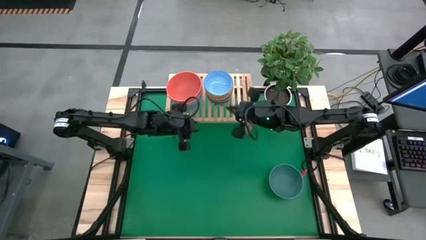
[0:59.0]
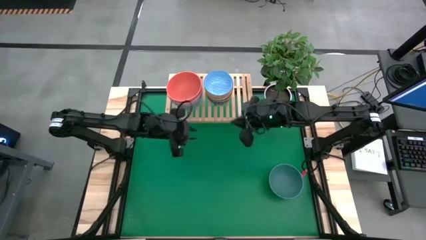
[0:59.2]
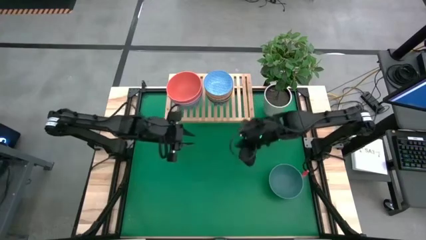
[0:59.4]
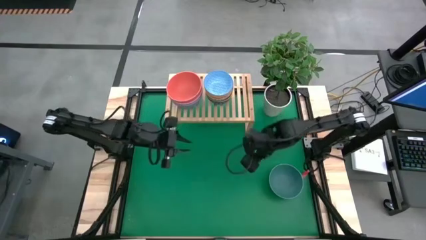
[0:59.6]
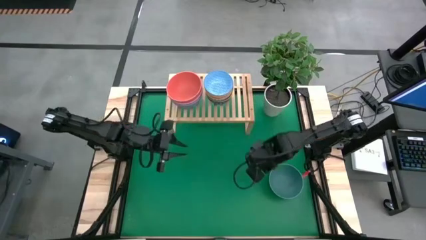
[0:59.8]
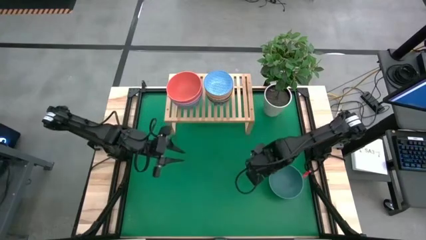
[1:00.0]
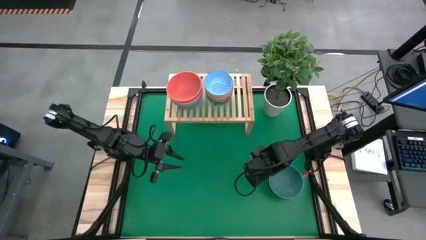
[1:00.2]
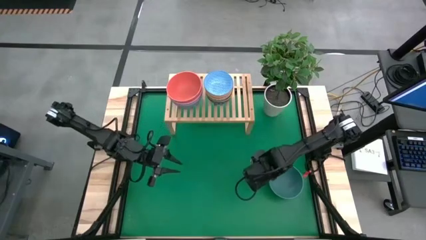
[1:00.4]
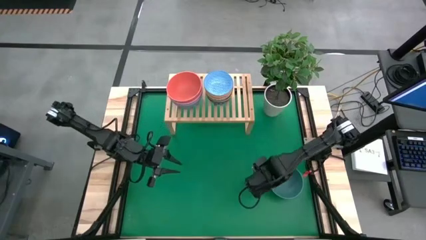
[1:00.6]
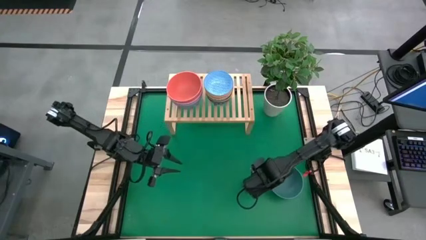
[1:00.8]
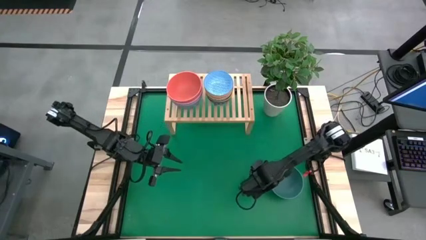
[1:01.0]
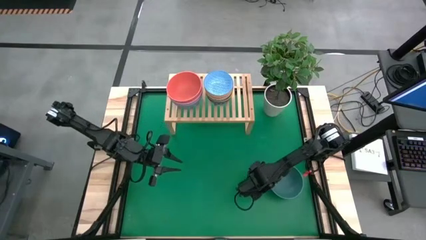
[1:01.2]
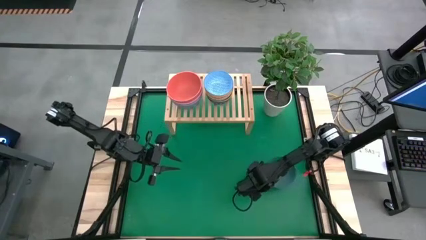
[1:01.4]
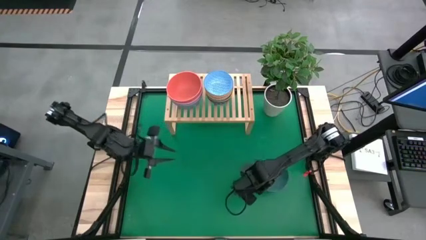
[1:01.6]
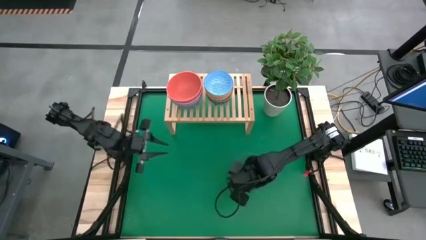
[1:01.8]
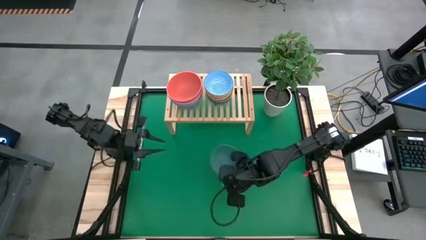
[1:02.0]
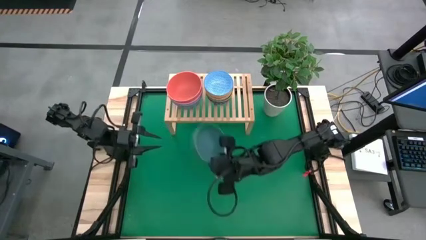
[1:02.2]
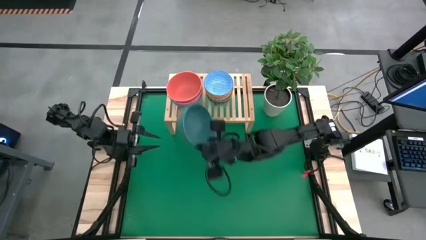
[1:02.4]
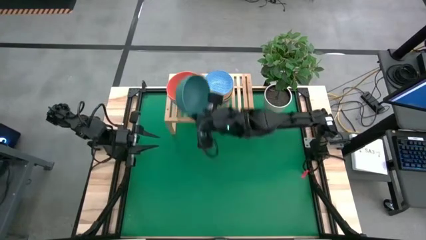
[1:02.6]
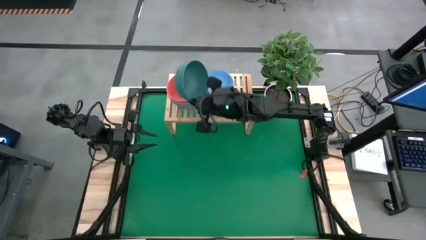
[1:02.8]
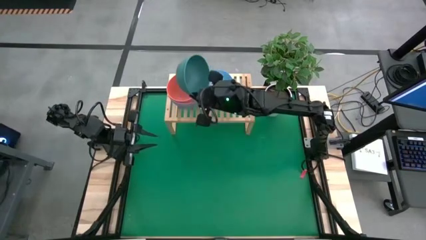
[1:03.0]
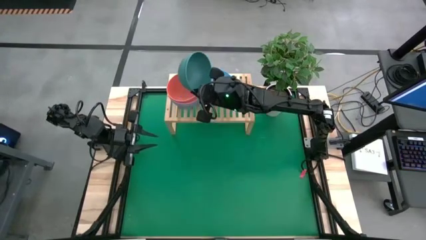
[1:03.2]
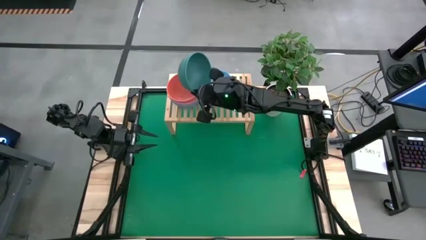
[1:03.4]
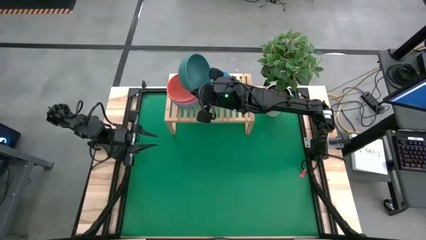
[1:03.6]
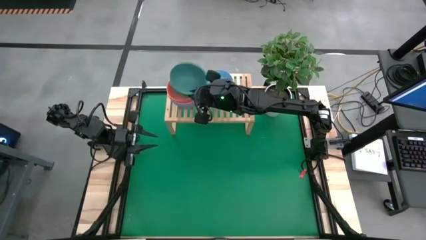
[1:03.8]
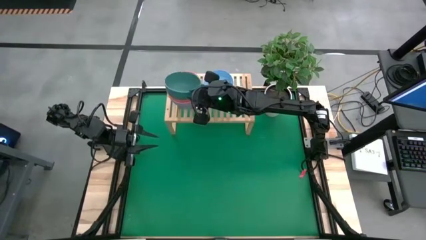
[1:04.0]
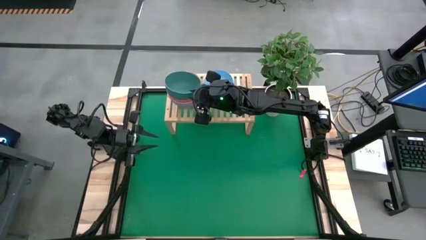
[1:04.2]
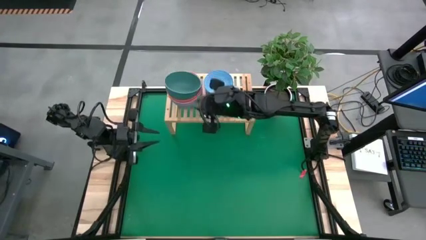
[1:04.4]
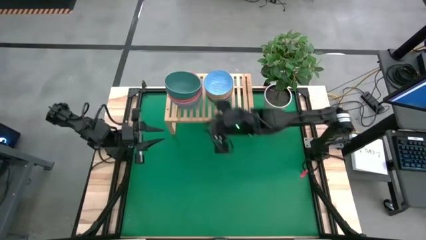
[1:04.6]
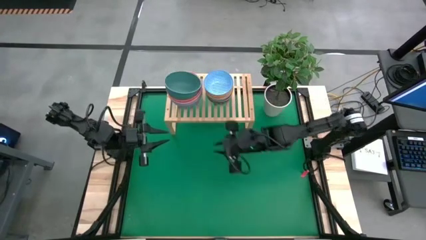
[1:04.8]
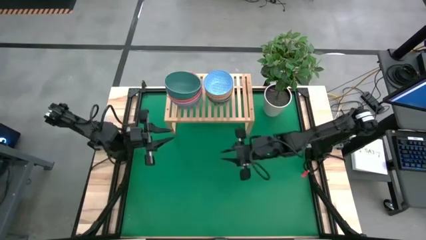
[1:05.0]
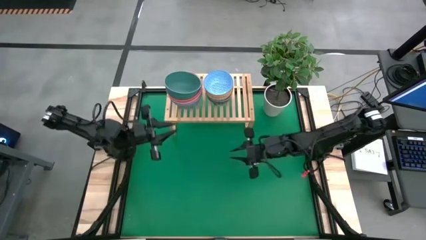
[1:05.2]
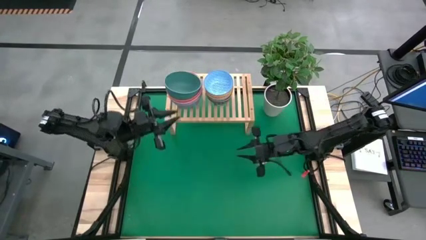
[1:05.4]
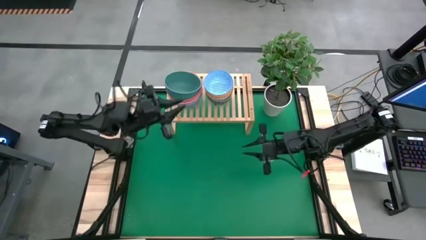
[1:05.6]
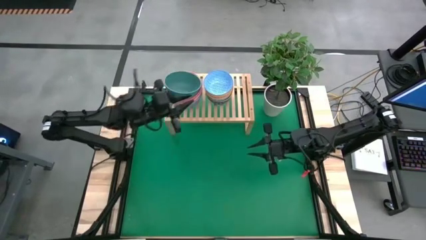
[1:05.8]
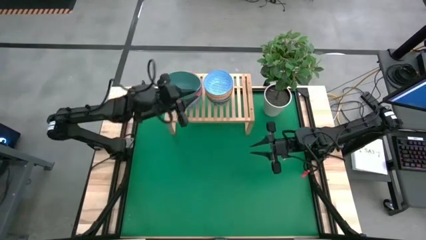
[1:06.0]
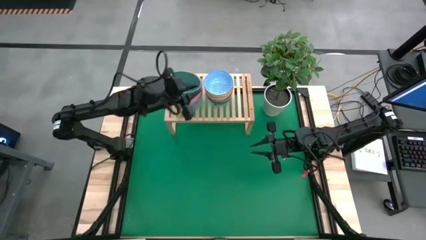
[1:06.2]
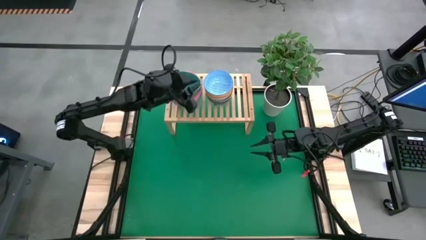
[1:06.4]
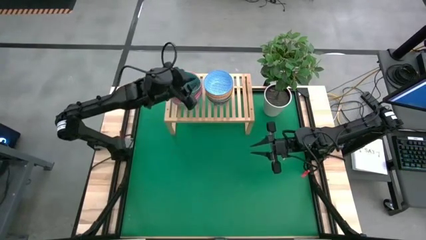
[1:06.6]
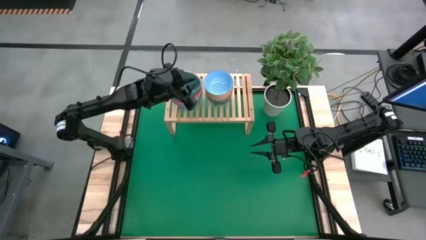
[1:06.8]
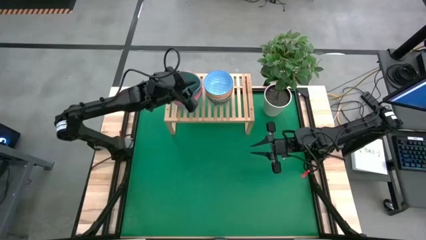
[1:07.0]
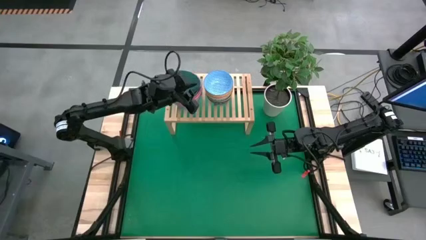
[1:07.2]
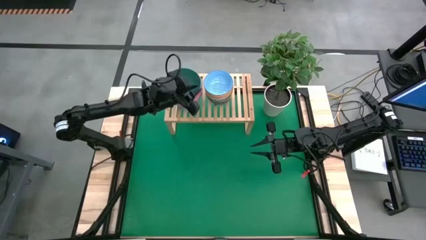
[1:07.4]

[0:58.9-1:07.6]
Task: Place and stack bowls onto a shelf
Stack the dark green bowl on top of the orange bowl on the shelf

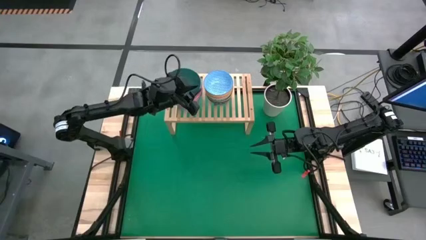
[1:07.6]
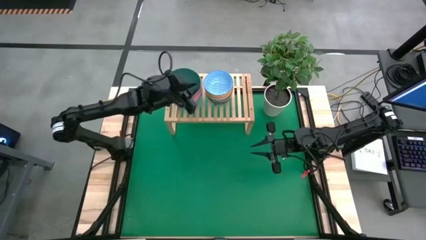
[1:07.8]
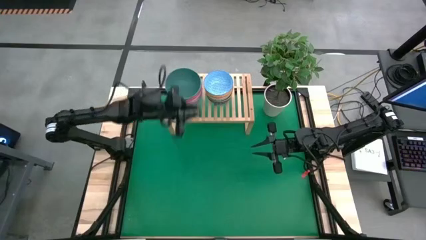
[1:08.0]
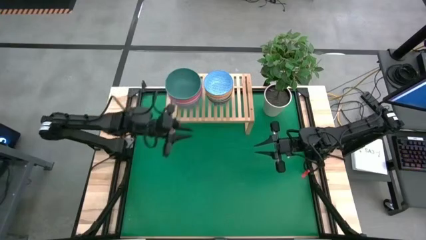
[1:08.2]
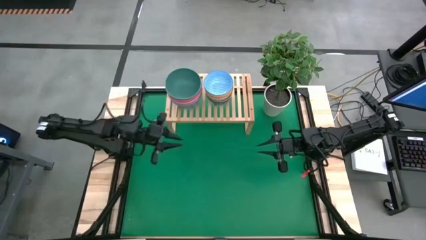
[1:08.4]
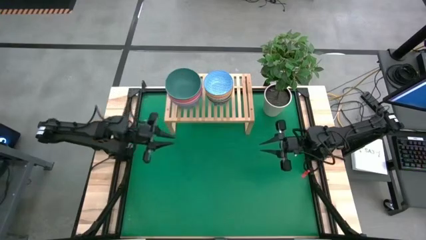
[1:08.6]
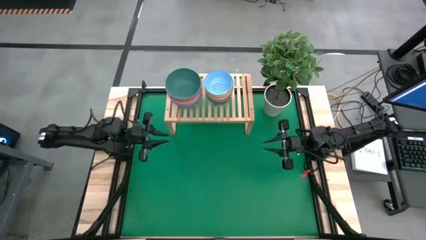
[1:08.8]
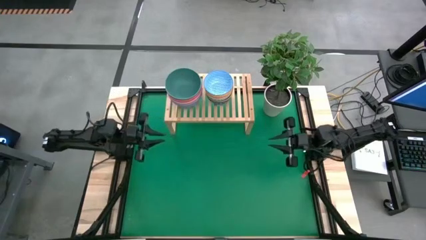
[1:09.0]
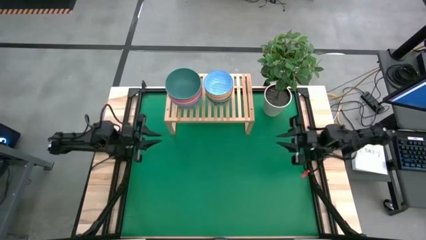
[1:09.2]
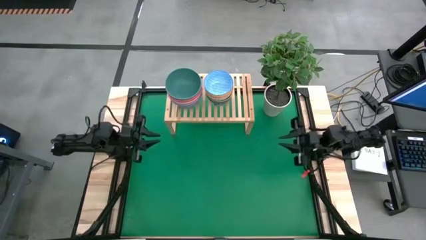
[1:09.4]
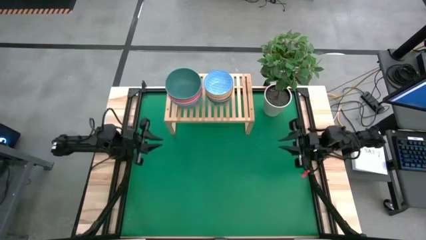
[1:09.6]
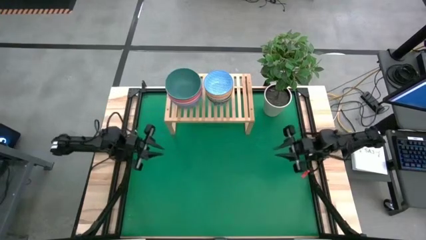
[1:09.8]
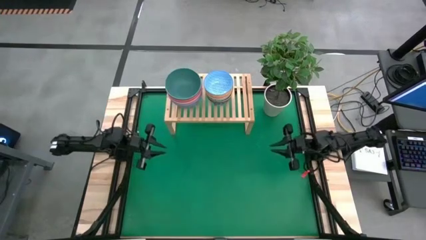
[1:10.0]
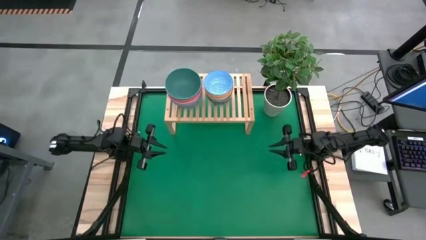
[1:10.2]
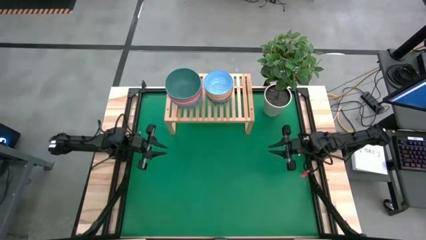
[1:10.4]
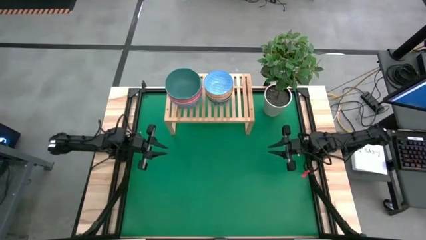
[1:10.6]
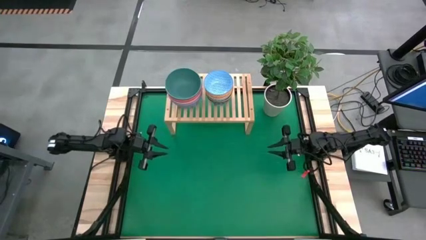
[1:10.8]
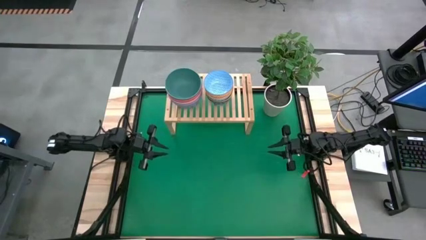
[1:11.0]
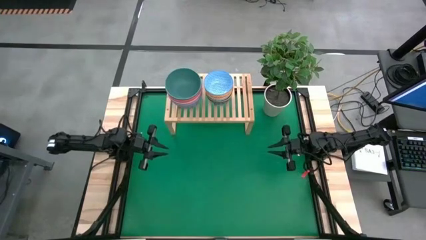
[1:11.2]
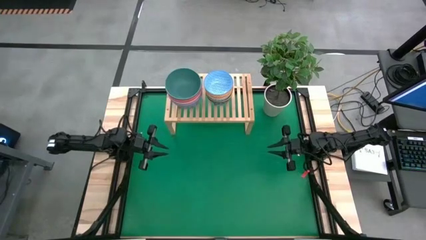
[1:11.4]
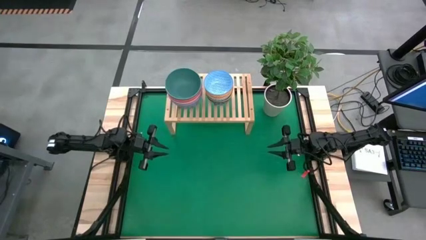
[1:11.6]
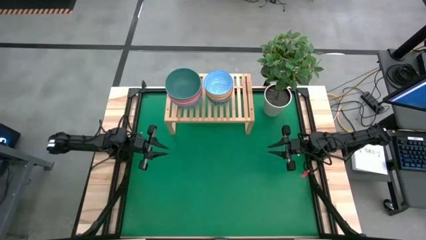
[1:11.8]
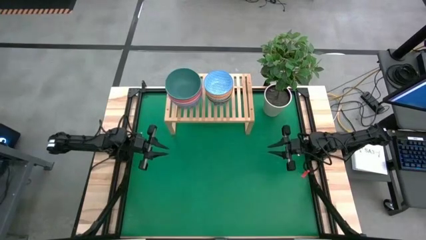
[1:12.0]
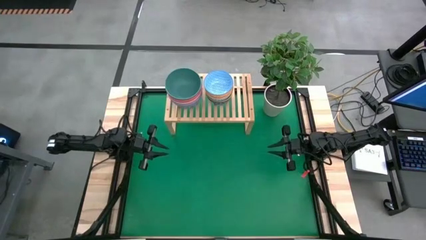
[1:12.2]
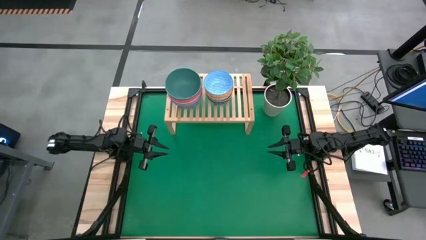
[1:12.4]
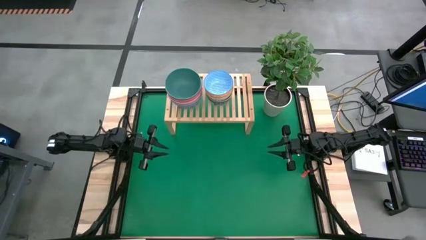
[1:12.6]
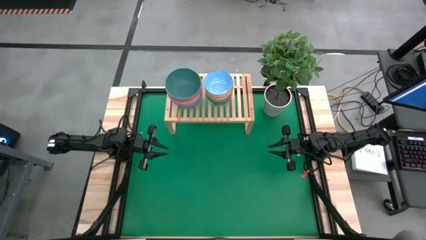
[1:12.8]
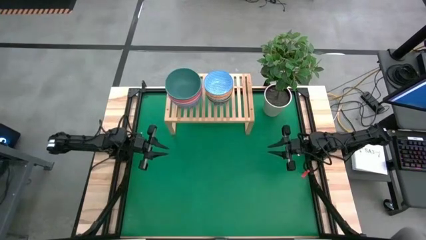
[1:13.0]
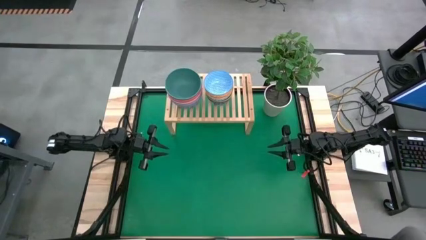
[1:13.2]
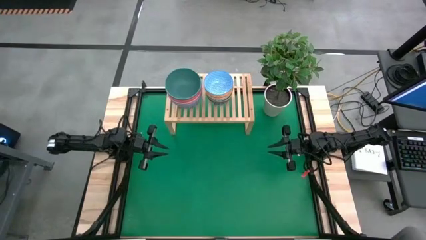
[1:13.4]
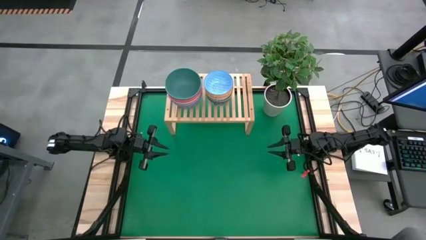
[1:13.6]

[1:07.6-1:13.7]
Return to Home Position
